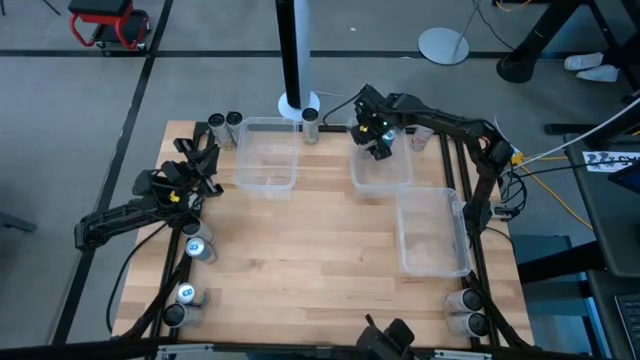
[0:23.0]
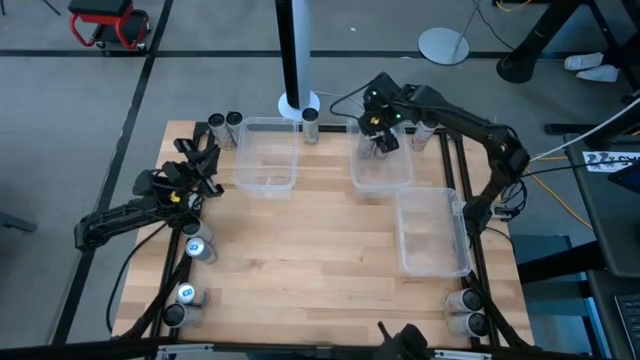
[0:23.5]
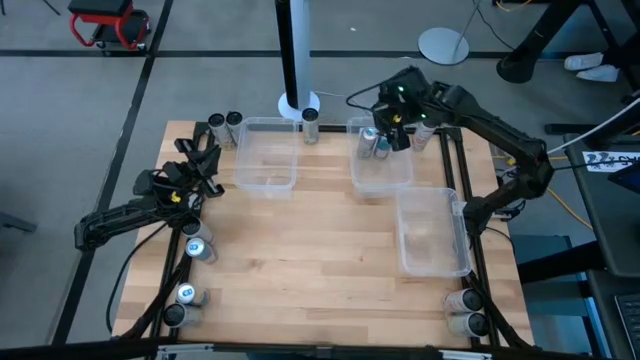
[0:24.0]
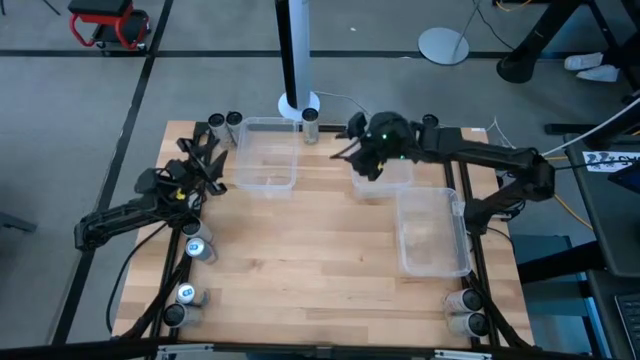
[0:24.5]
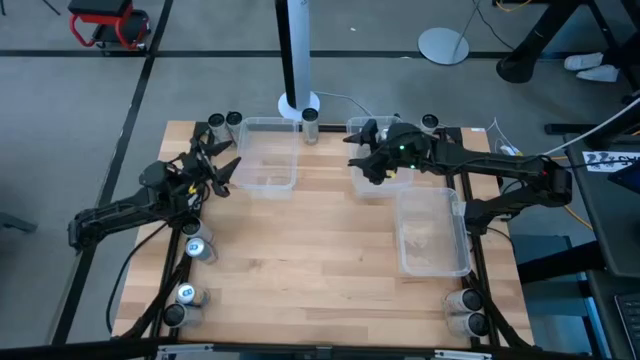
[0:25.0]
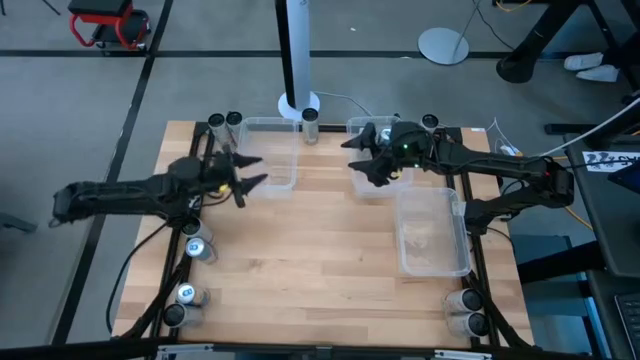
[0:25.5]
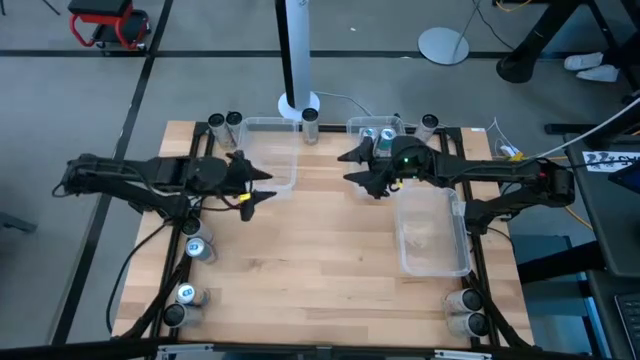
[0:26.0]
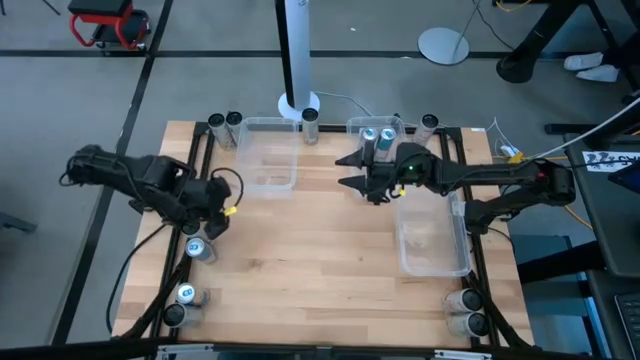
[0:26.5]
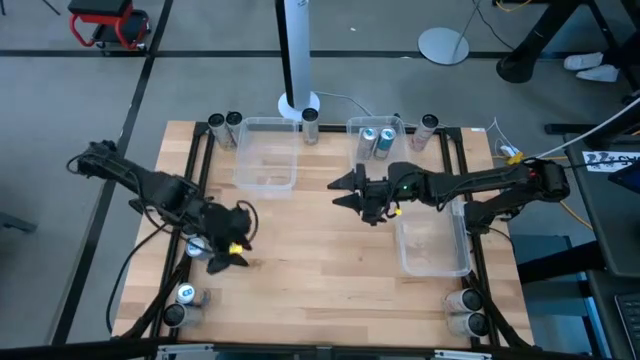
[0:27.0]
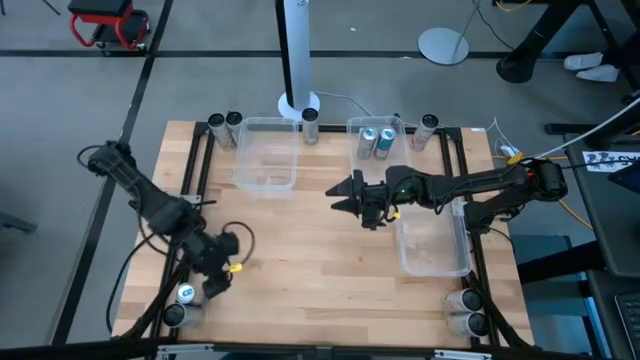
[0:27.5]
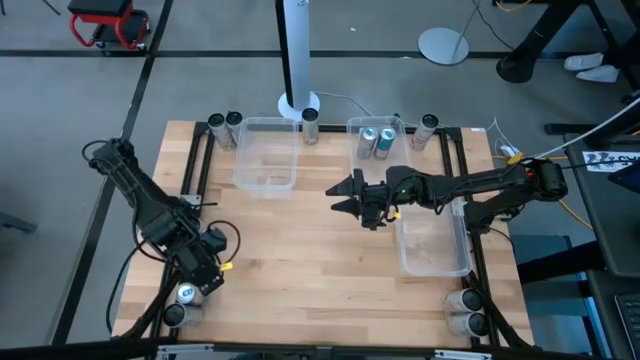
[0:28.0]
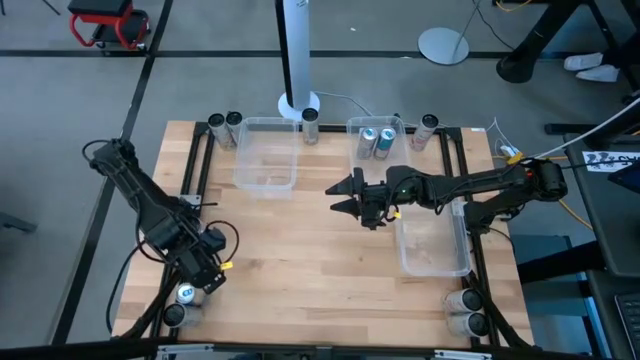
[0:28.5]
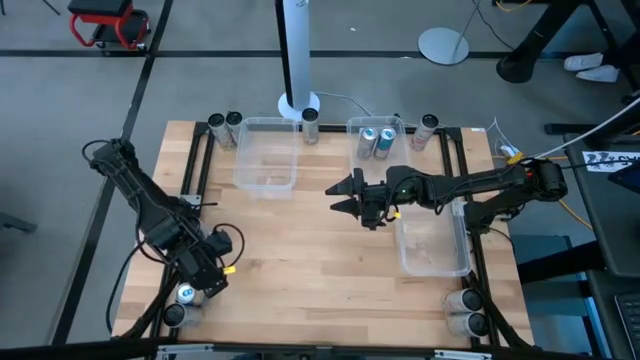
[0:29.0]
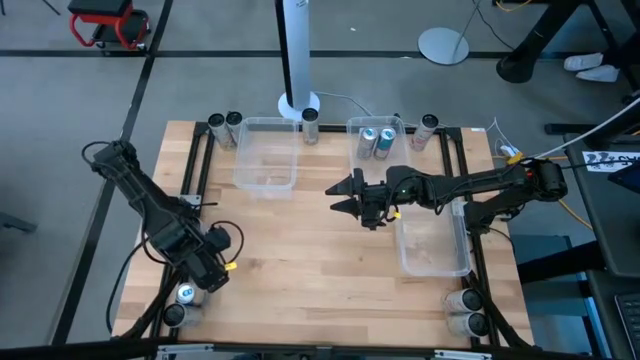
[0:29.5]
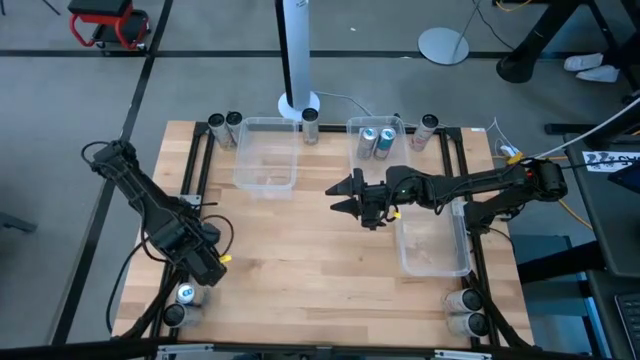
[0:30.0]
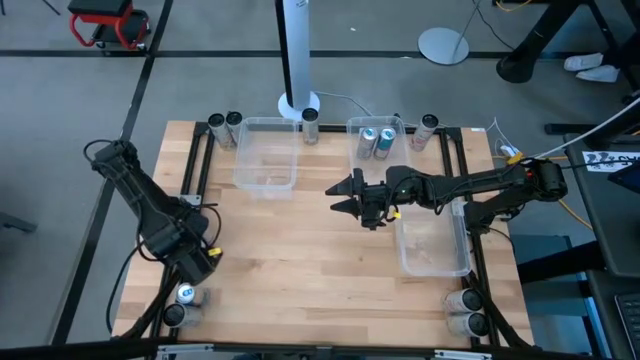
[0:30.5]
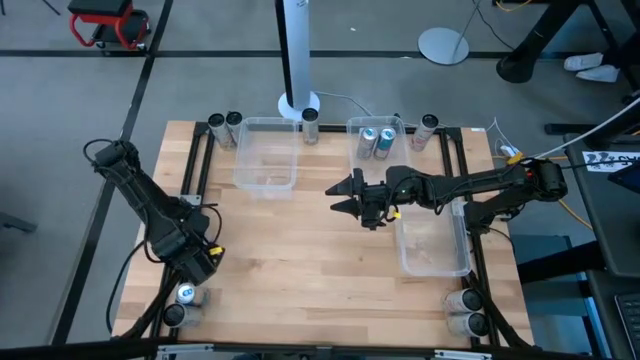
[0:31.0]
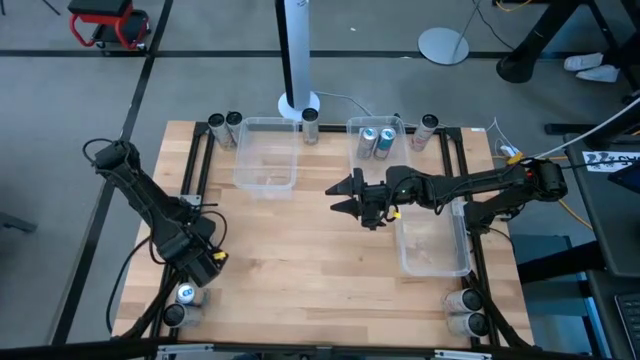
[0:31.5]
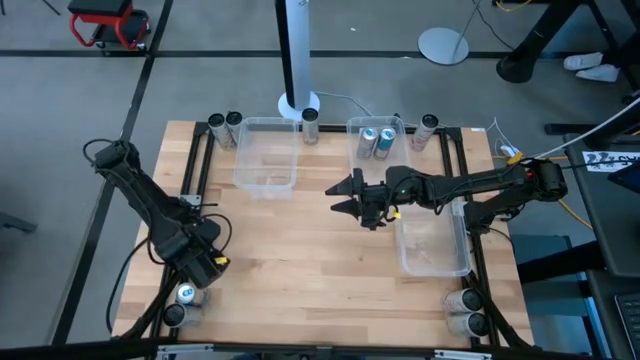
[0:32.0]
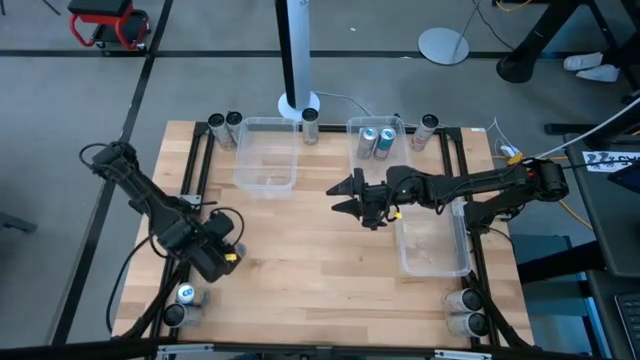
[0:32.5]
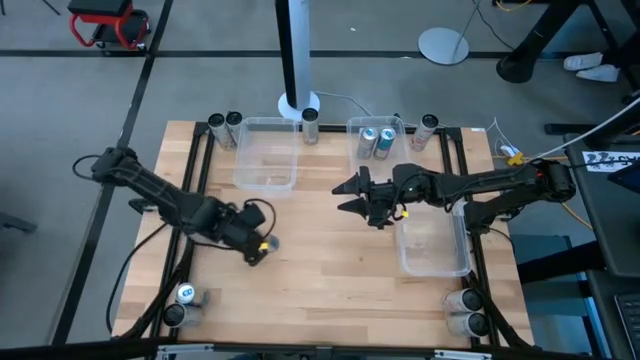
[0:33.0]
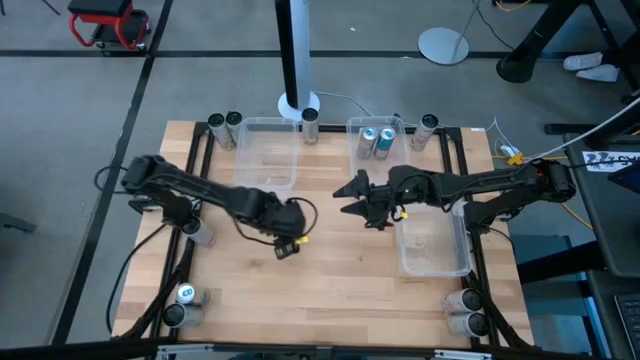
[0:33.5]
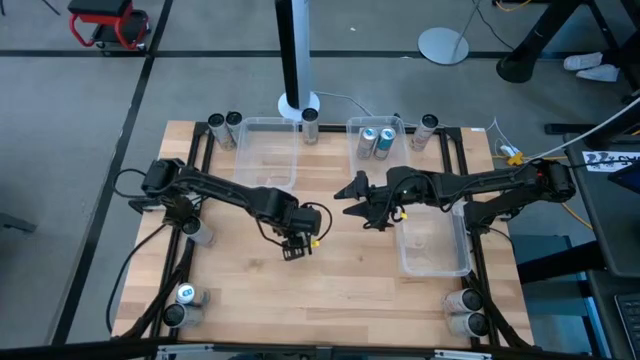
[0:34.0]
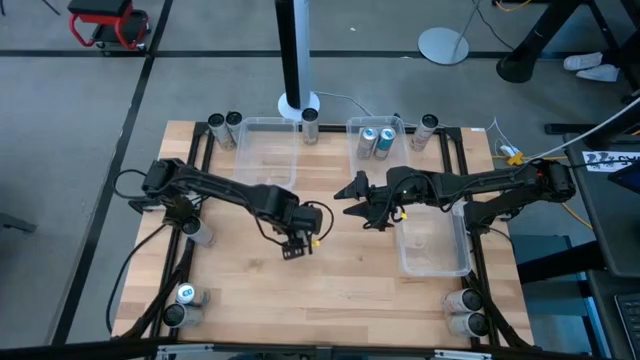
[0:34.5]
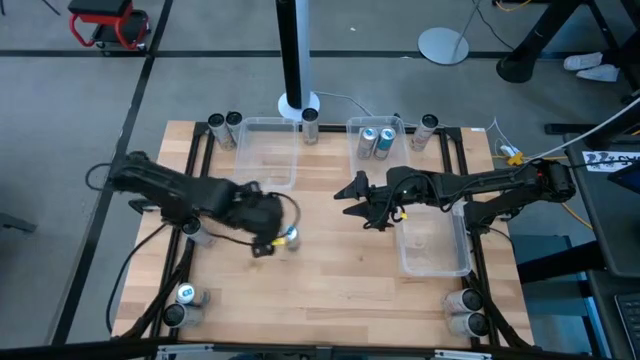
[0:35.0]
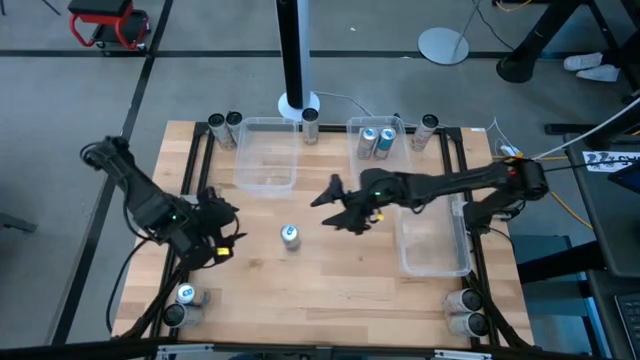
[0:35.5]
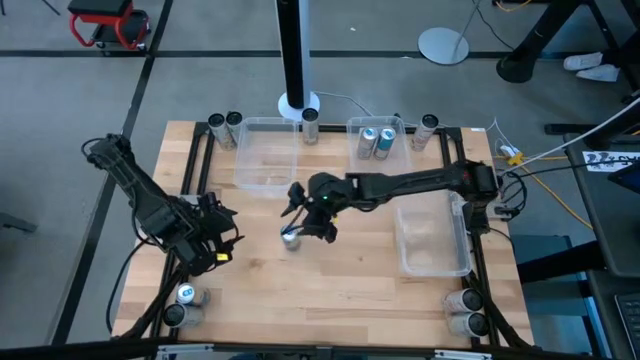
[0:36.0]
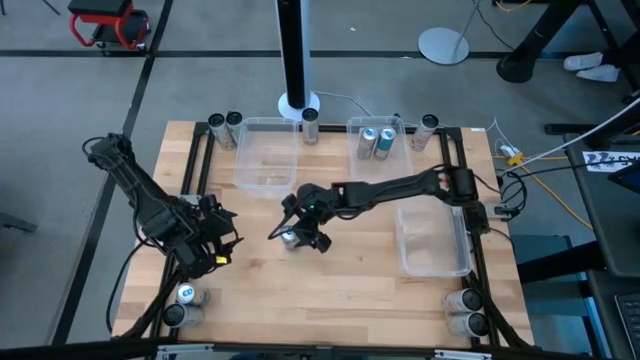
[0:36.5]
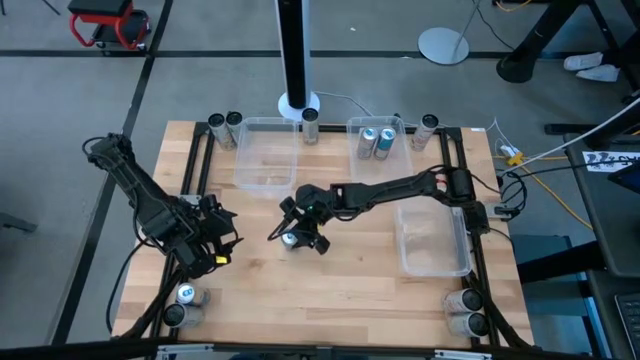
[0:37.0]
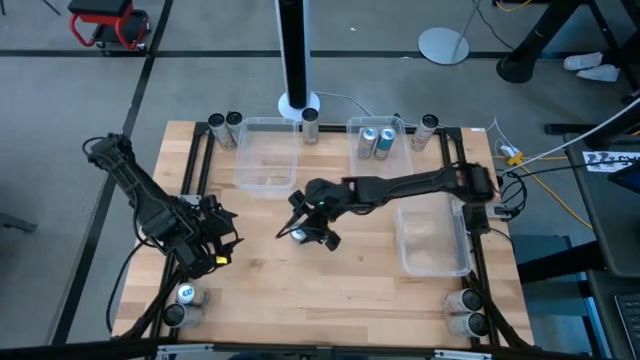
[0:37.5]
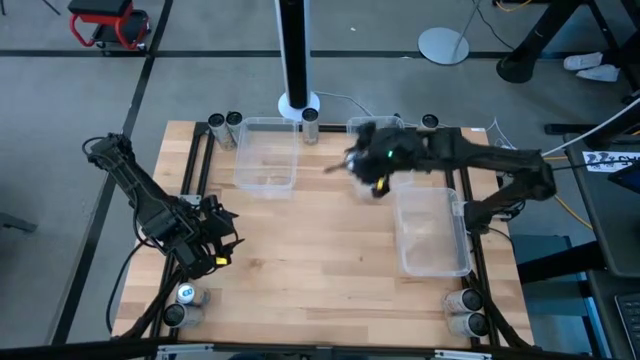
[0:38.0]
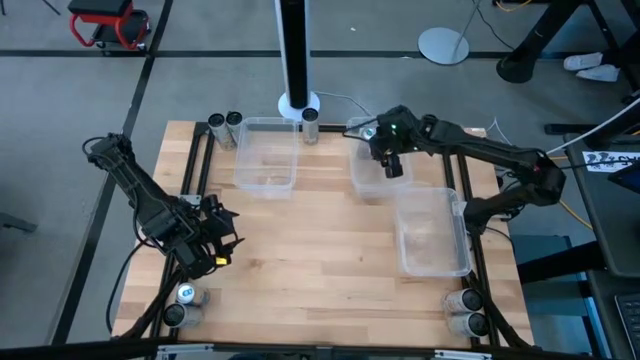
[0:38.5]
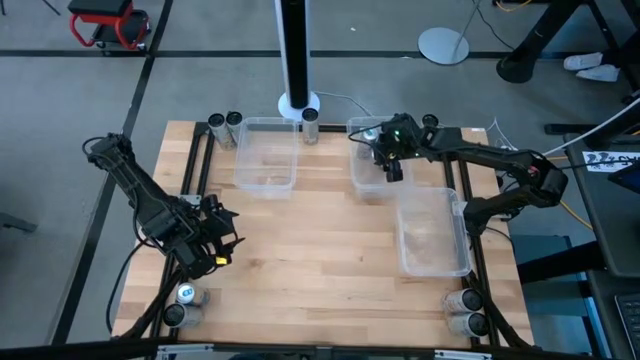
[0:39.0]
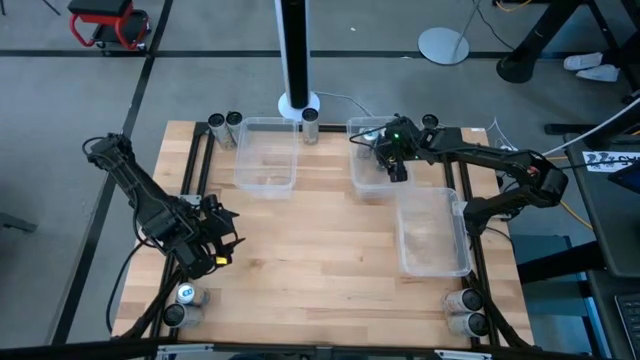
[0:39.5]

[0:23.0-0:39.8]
Task: Sort soda cans
Put the blue soda can into the top right transparent bin

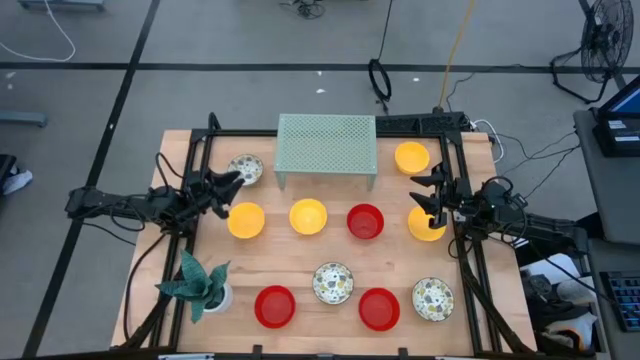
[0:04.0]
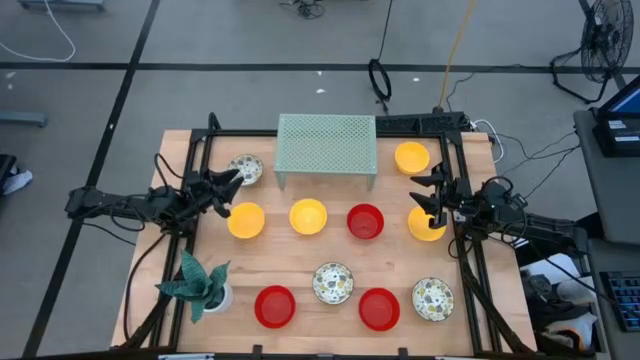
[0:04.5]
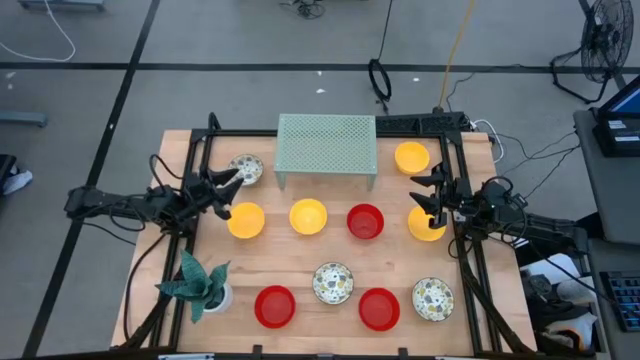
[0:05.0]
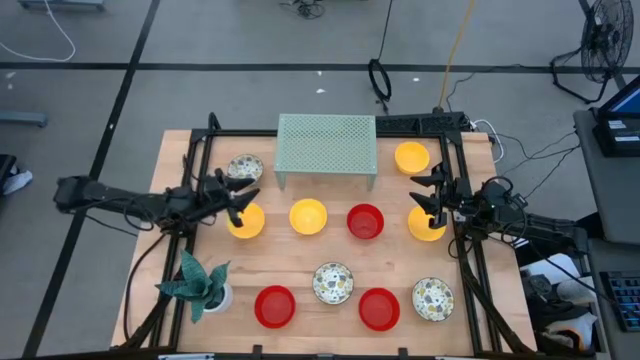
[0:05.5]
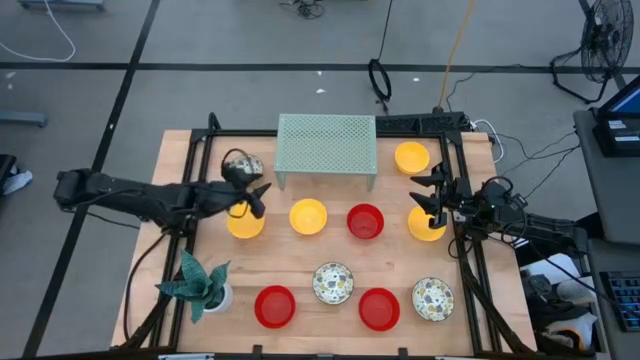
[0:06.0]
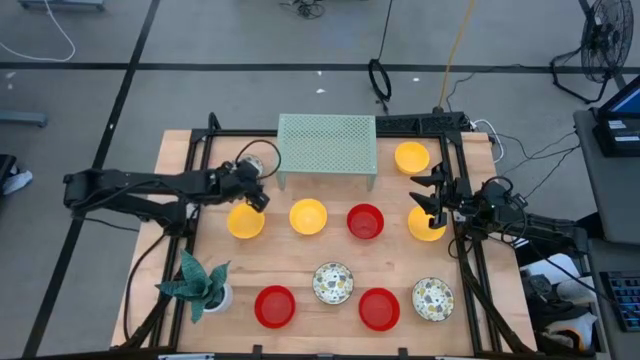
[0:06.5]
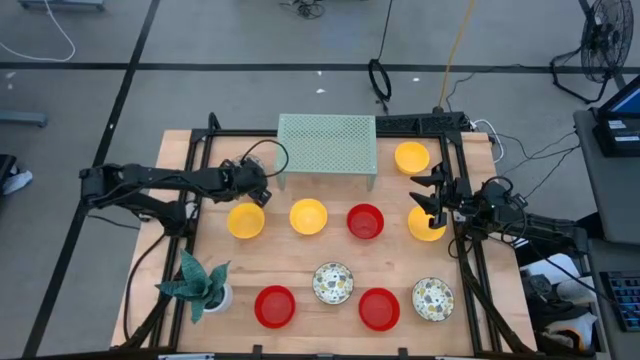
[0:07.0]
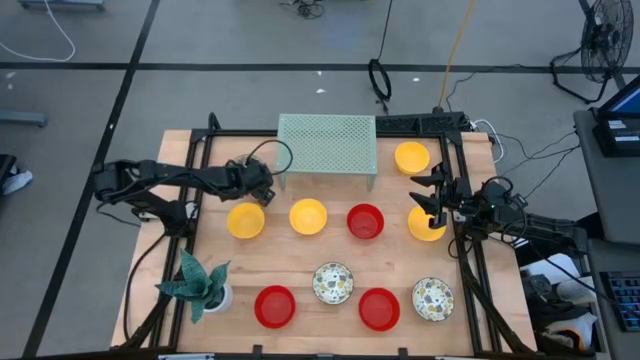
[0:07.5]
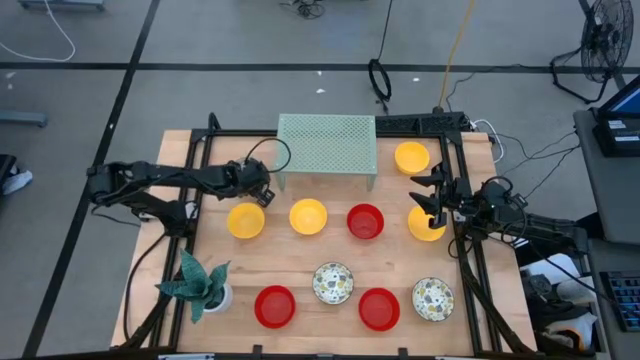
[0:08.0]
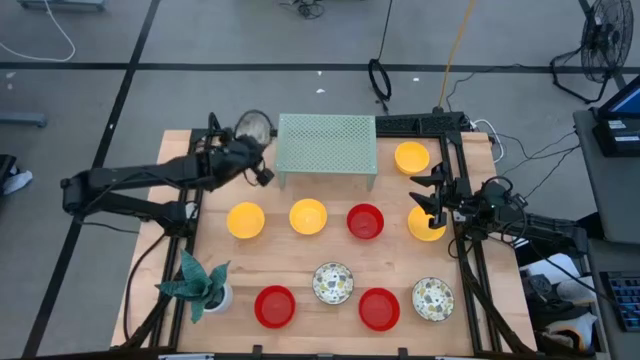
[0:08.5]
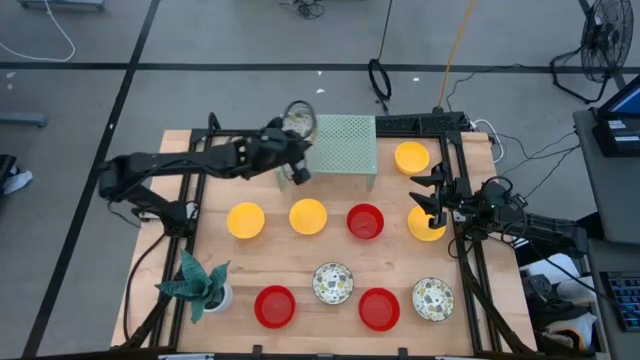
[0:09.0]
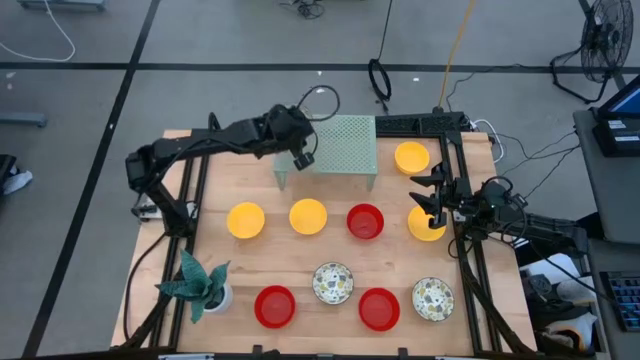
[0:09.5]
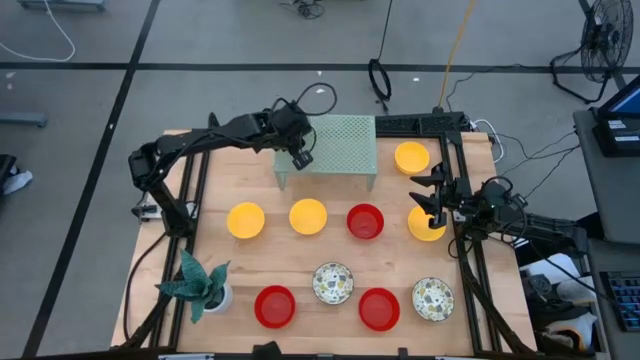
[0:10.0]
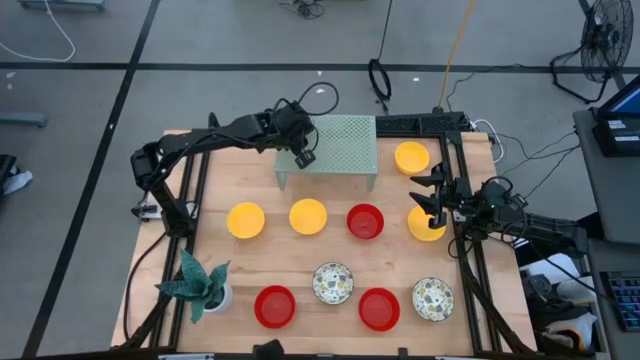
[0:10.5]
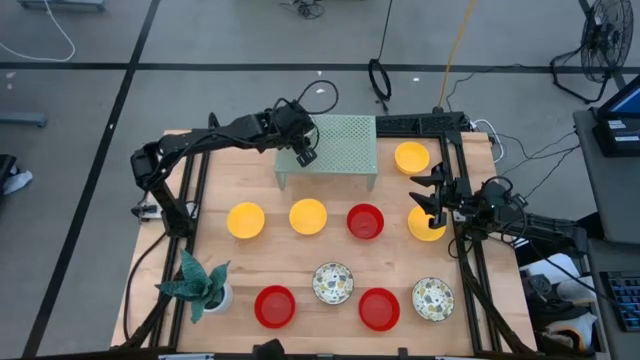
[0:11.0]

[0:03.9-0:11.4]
Task: Pick & Place Mini bowls
Put the white patterned bowl on the shelf
